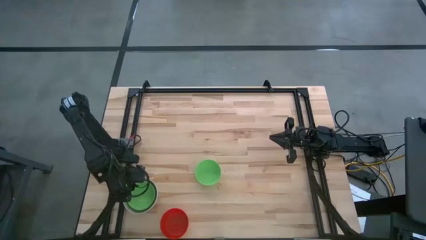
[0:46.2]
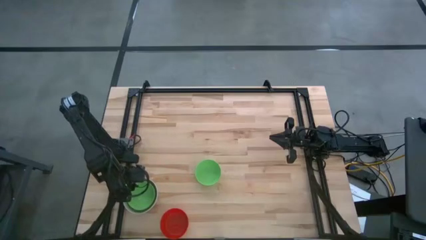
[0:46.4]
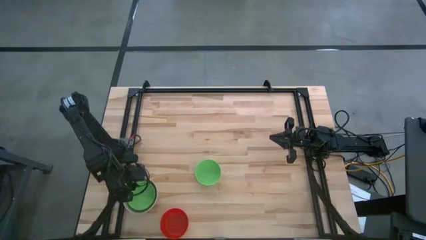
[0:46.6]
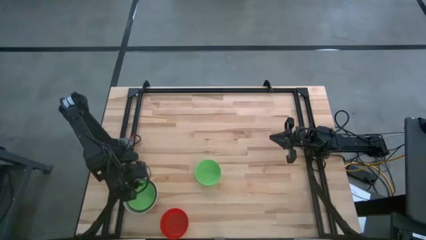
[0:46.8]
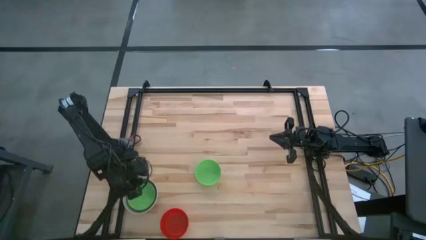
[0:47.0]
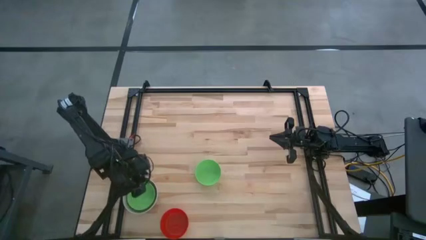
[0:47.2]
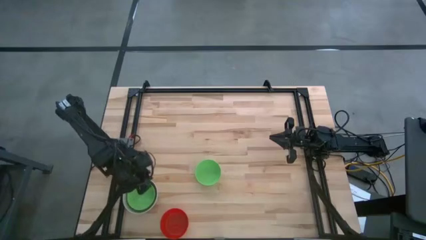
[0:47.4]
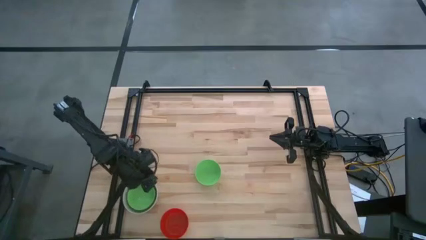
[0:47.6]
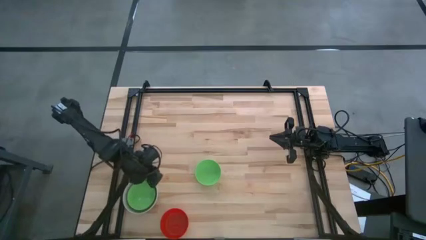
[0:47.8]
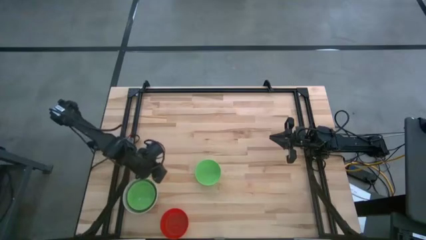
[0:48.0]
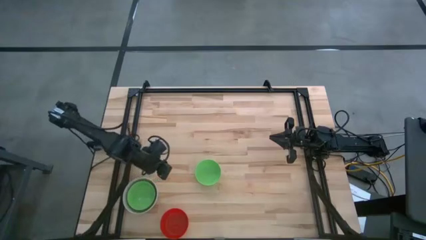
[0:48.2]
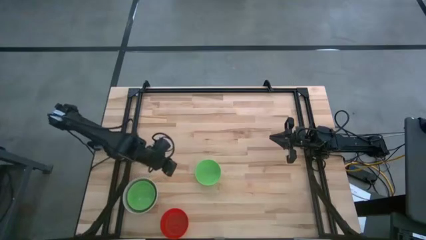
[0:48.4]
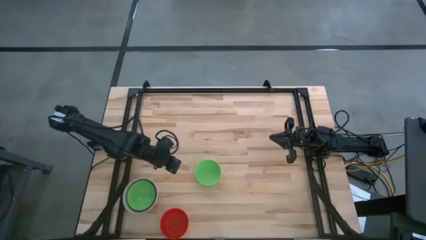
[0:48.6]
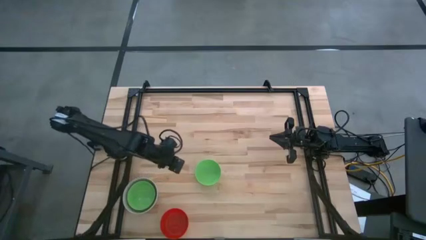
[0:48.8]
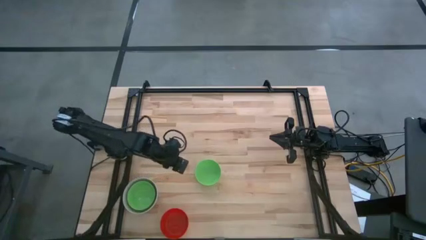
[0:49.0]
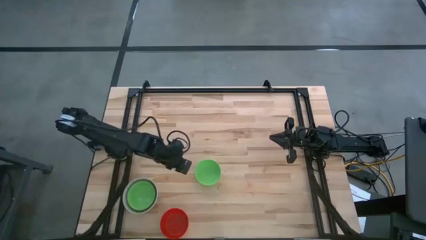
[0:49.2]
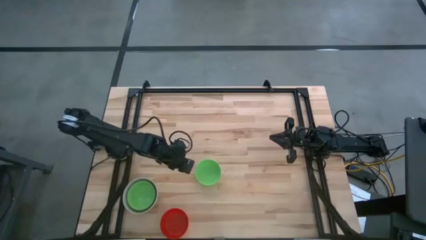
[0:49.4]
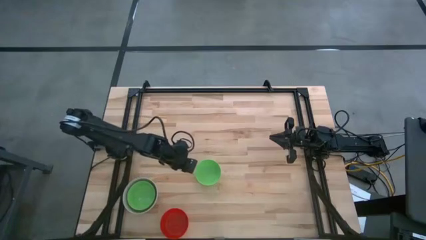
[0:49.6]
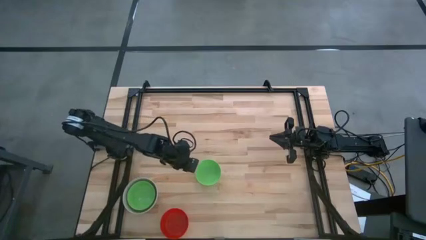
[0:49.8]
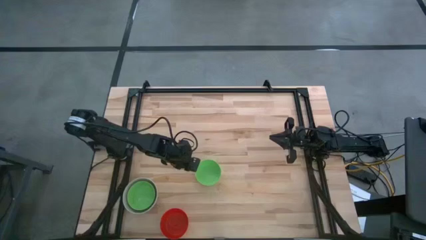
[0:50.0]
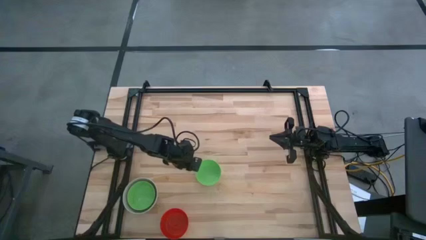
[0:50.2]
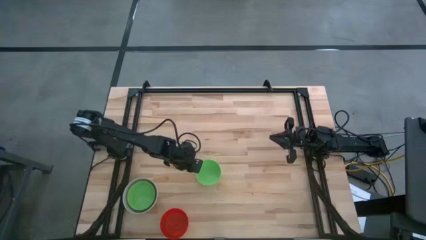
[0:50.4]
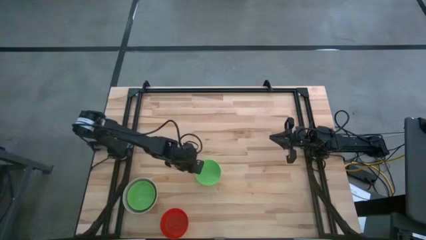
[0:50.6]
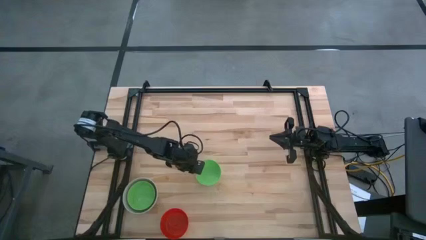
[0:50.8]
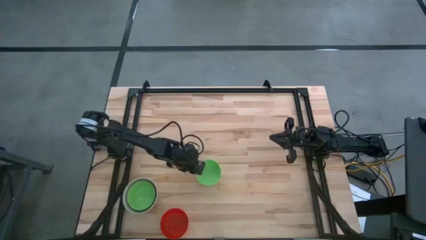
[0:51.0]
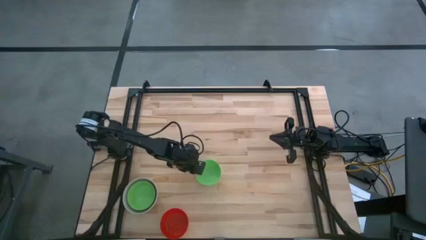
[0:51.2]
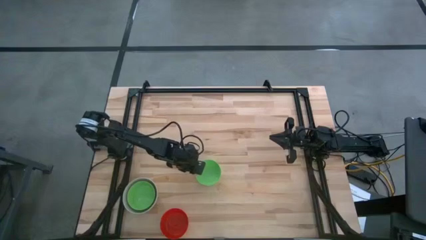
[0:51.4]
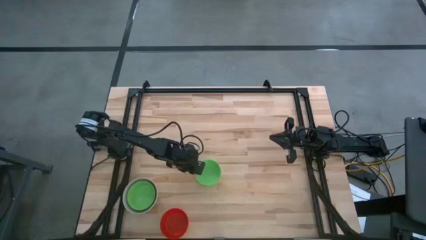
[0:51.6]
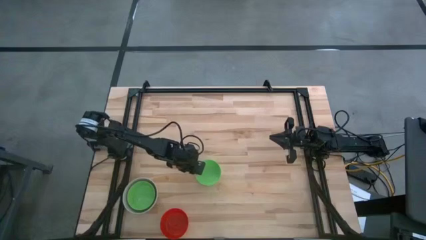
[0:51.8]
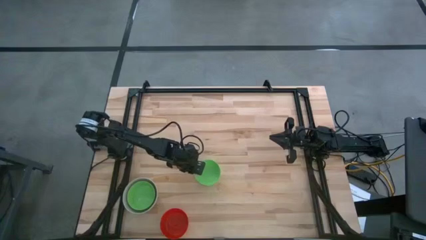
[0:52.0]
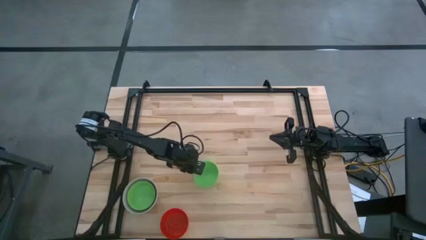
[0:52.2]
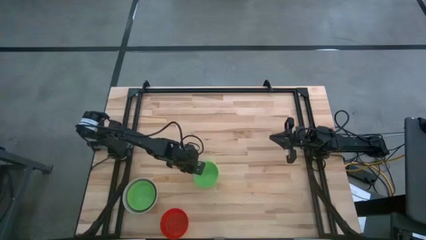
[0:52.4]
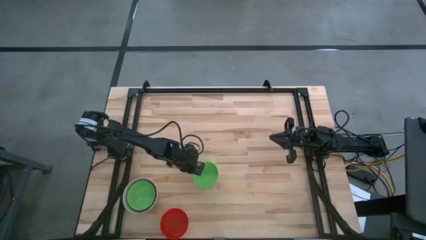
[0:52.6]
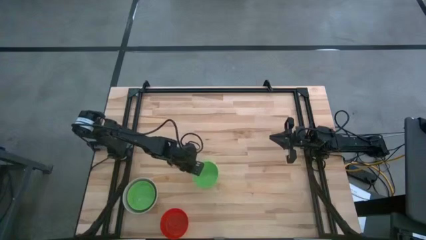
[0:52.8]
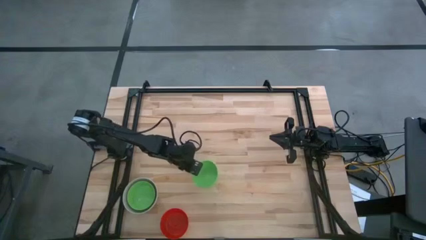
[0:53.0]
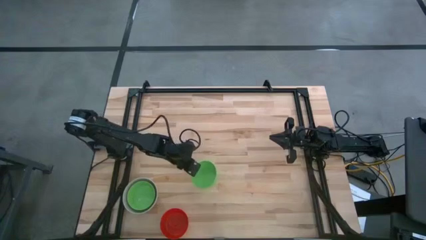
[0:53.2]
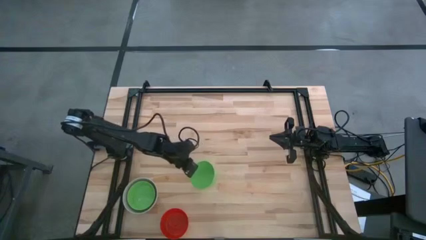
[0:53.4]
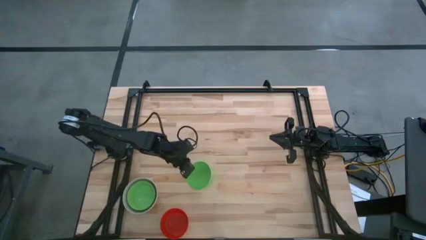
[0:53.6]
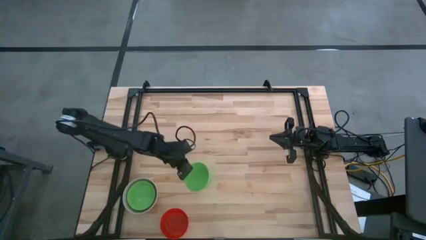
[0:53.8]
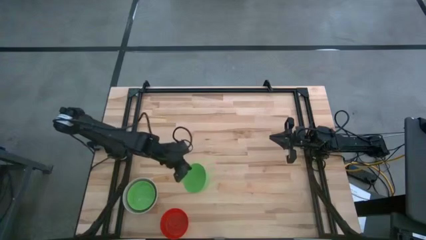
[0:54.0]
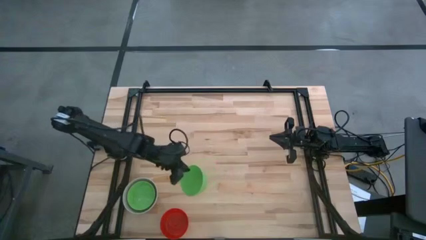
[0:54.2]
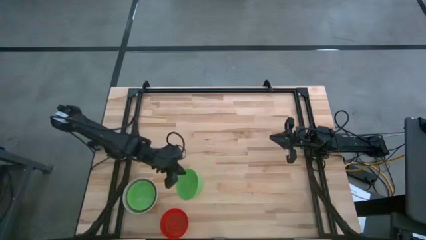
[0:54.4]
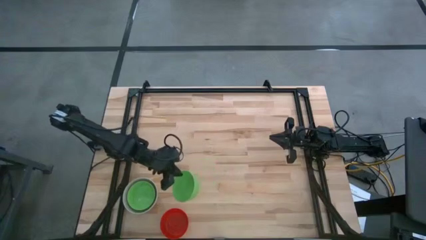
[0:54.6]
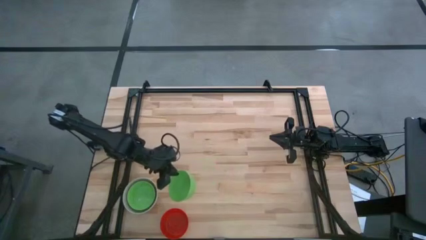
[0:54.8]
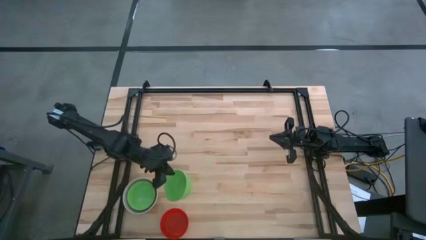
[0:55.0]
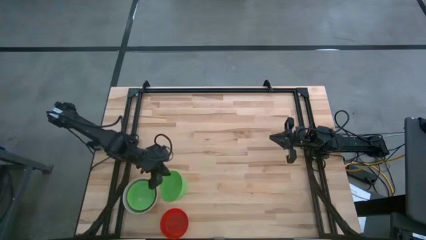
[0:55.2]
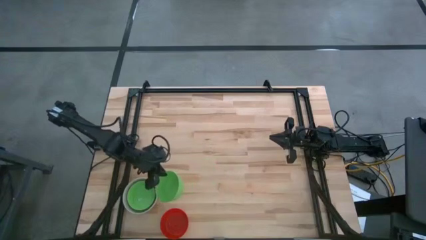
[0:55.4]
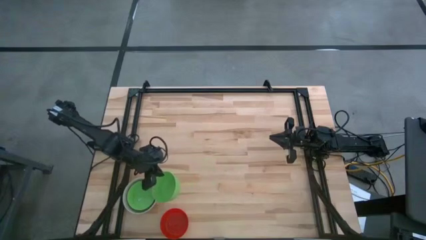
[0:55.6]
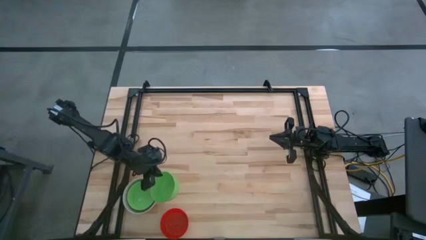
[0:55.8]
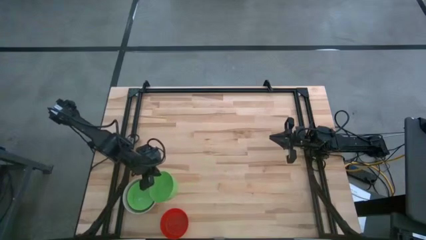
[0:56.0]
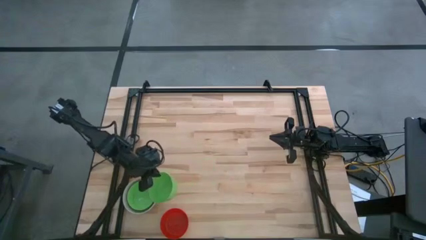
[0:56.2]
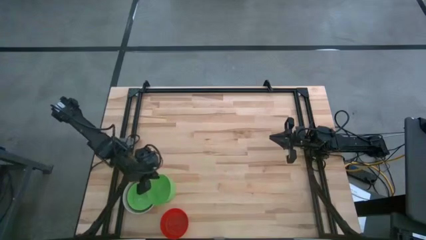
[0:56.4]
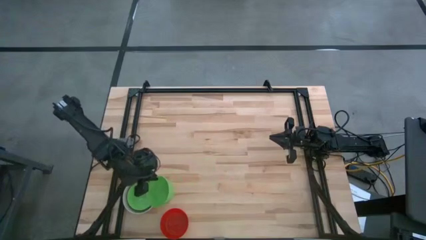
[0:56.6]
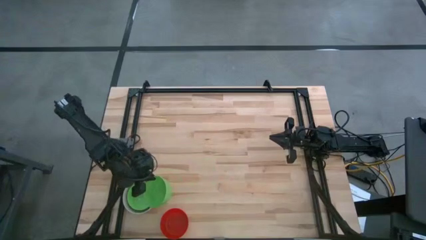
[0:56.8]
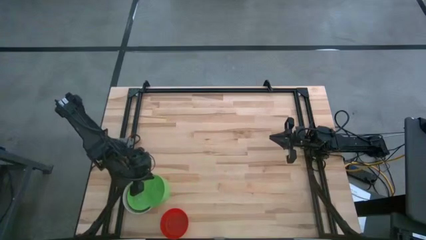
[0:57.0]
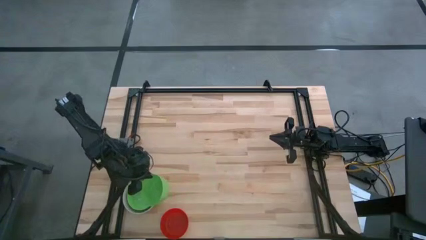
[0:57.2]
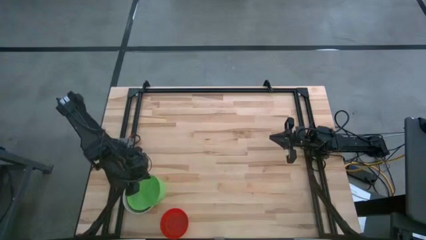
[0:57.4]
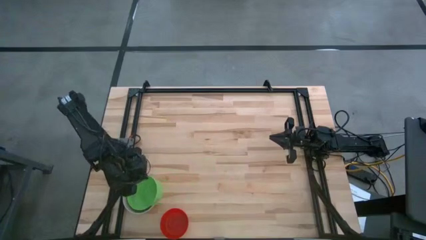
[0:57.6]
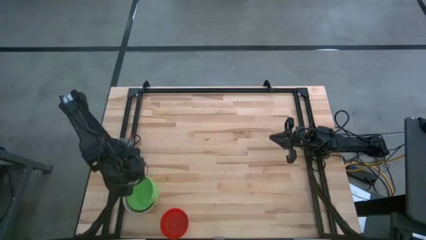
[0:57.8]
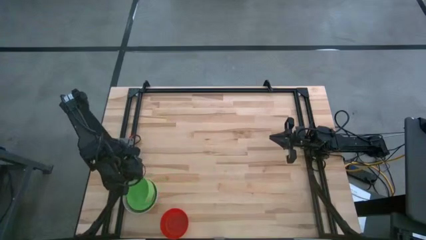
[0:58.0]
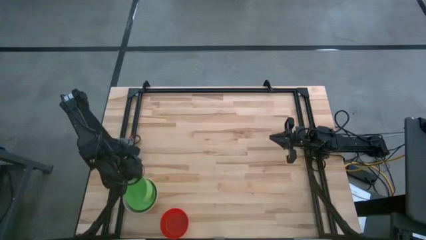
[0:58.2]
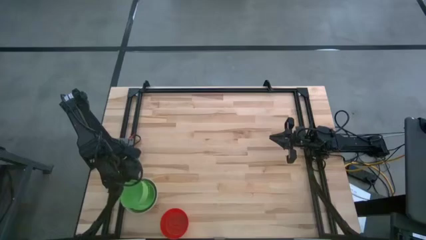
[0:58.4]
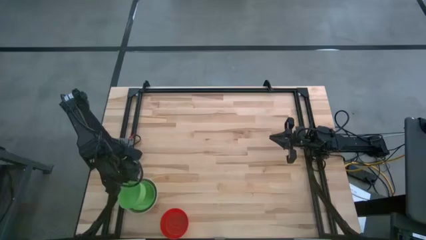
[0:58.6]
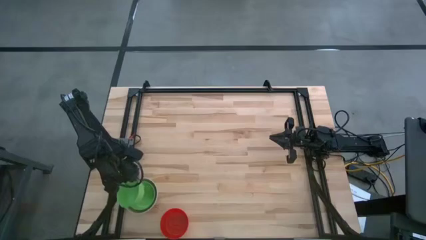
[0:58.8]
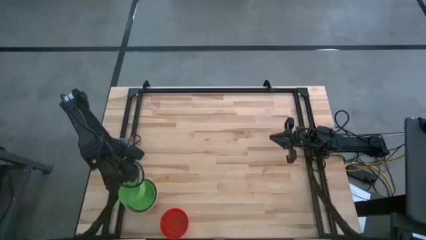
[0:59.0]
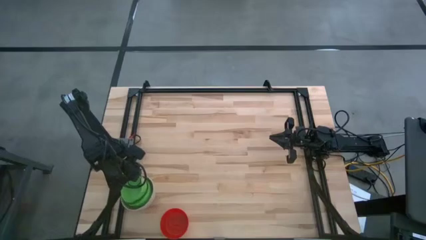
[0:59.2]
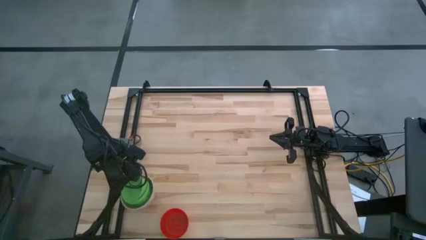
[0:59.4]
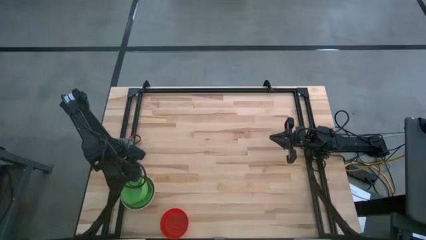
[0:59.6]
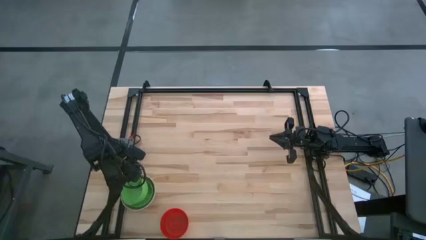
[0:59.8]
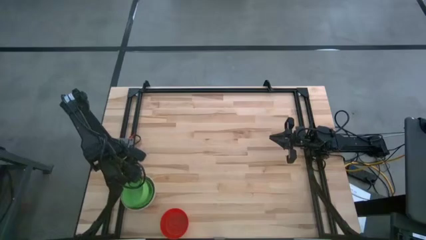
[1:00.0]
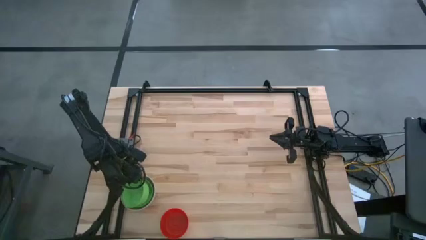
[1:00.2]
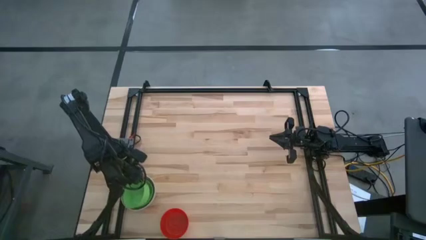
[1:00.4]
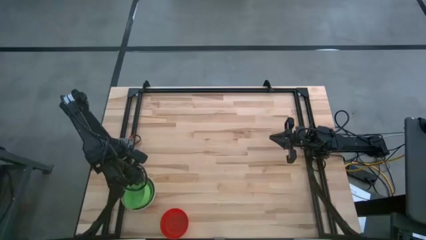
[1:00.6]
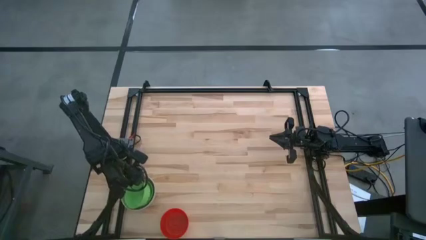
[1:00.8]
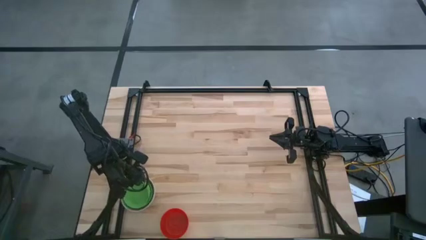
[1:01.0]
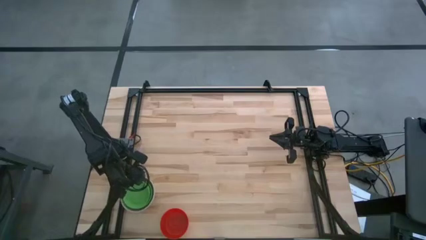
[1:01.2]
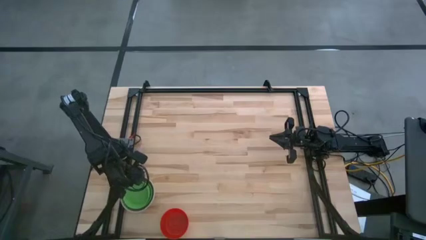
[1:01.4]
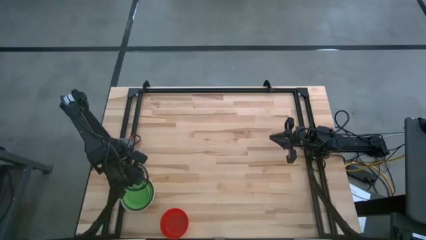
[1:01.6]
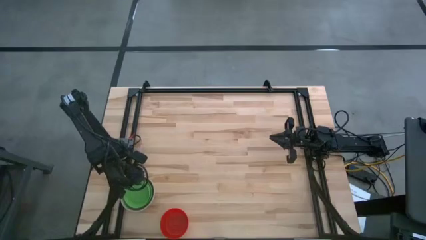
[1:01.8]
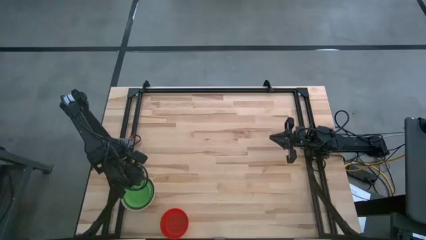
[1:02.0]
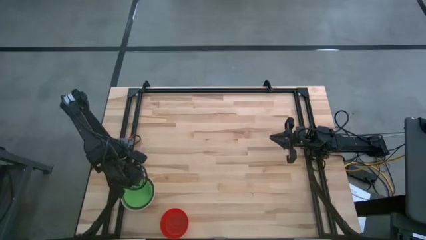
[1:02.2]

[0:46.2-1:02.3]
Stack the green bowl on the other green bowl
